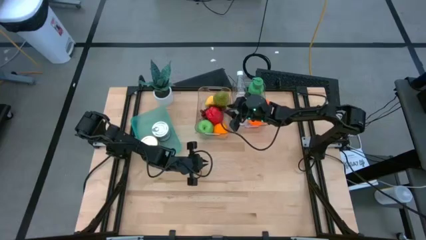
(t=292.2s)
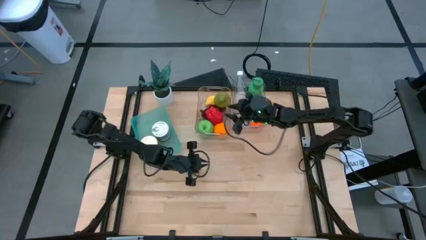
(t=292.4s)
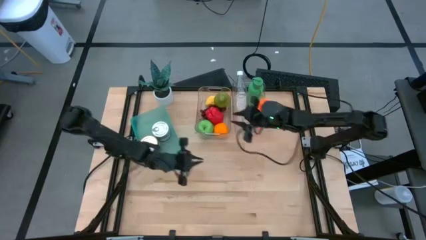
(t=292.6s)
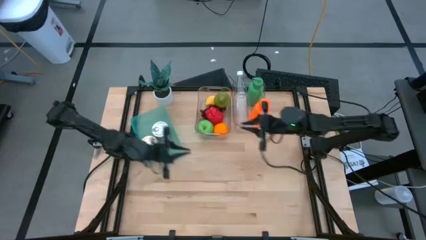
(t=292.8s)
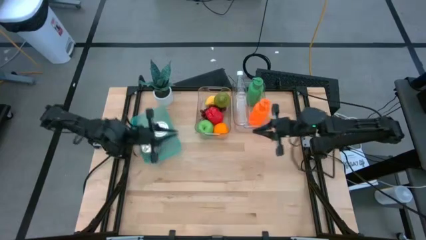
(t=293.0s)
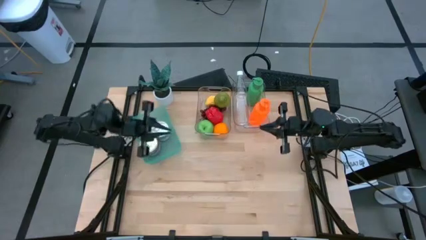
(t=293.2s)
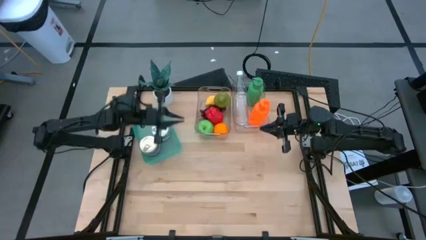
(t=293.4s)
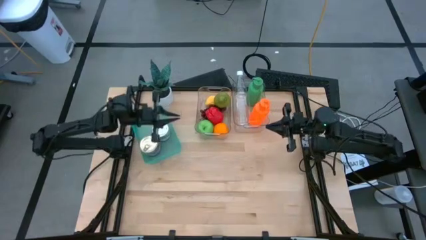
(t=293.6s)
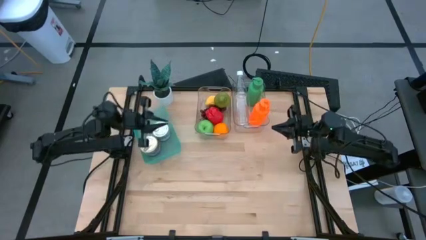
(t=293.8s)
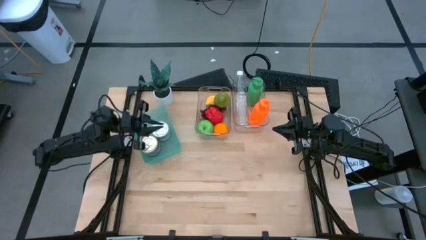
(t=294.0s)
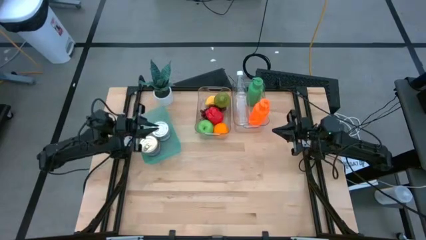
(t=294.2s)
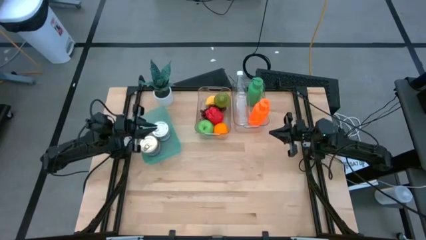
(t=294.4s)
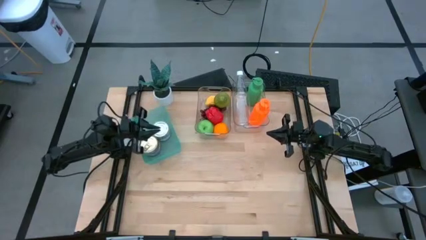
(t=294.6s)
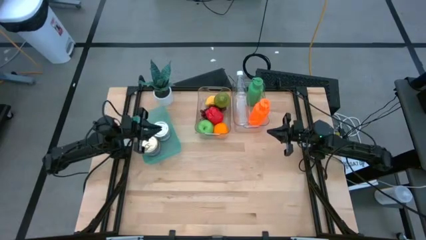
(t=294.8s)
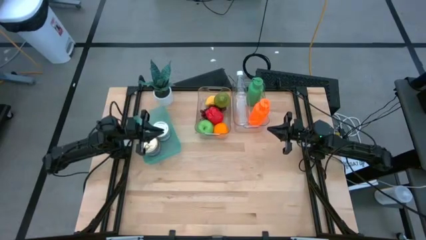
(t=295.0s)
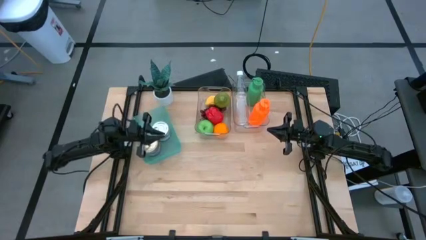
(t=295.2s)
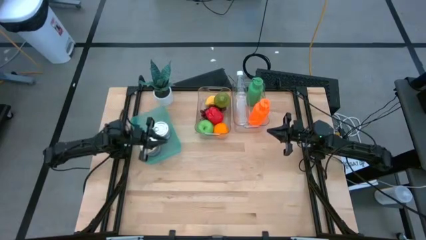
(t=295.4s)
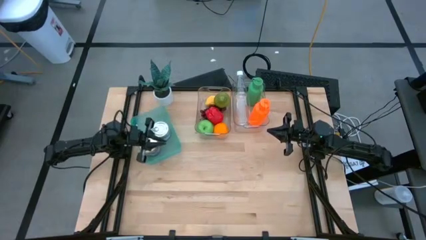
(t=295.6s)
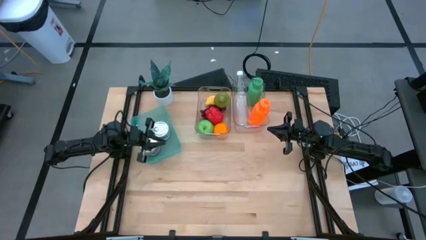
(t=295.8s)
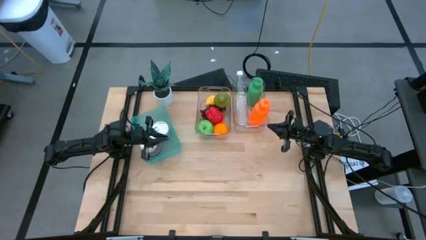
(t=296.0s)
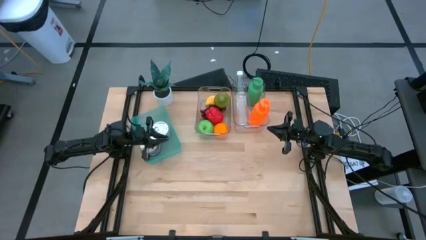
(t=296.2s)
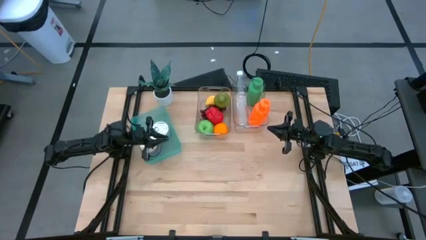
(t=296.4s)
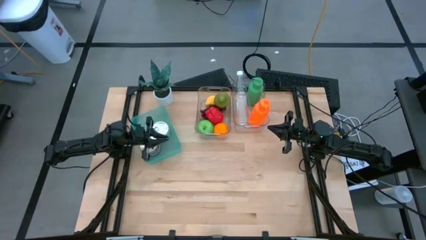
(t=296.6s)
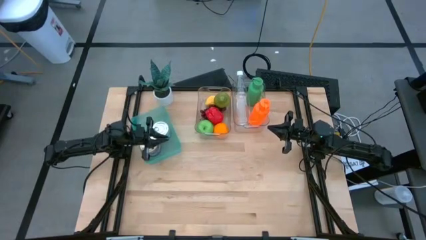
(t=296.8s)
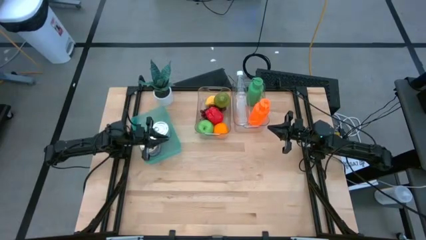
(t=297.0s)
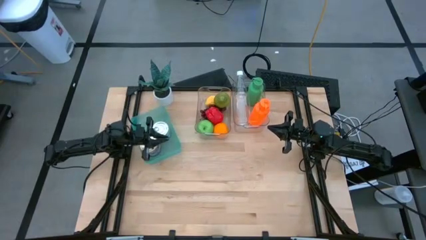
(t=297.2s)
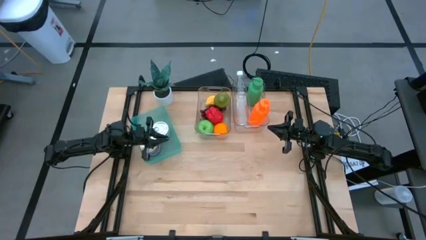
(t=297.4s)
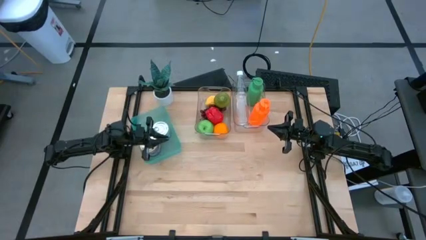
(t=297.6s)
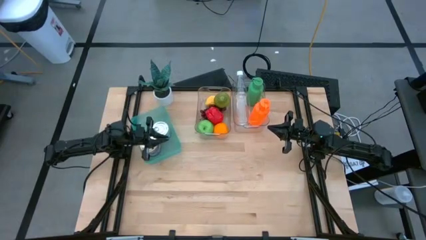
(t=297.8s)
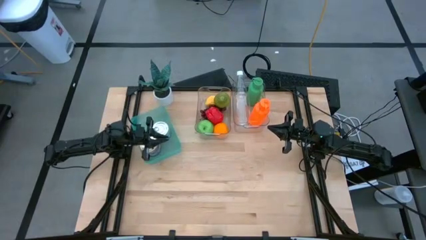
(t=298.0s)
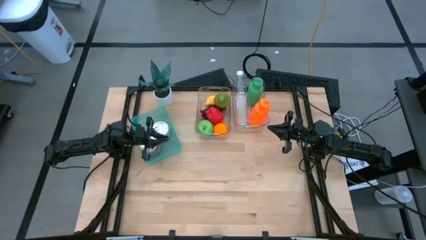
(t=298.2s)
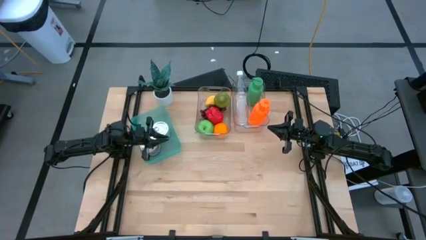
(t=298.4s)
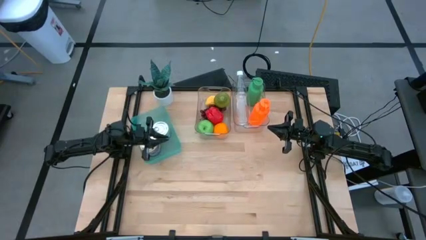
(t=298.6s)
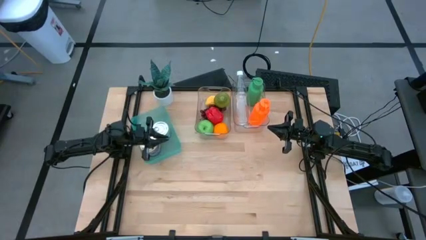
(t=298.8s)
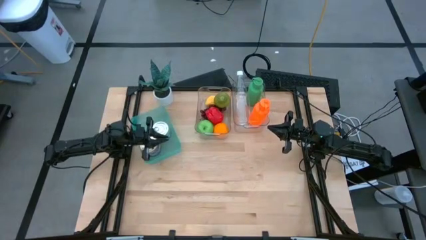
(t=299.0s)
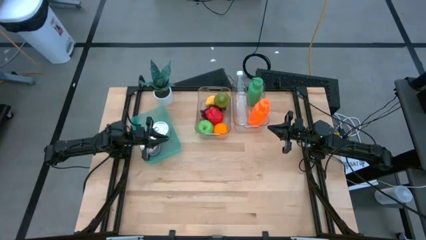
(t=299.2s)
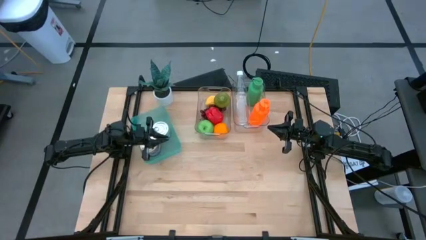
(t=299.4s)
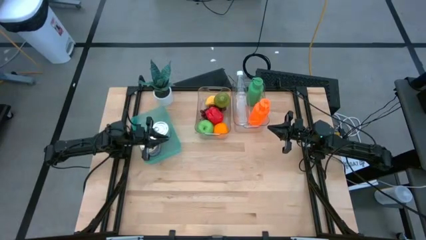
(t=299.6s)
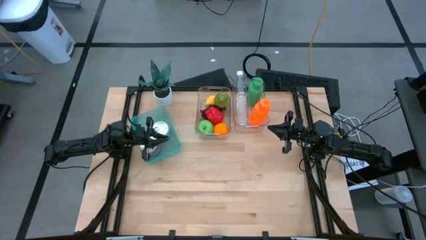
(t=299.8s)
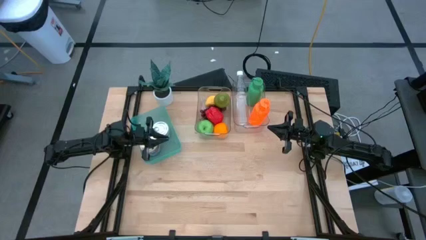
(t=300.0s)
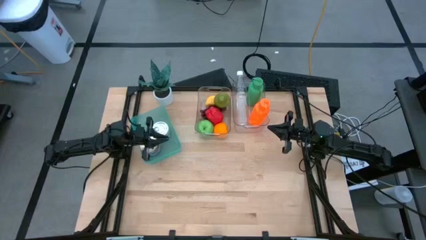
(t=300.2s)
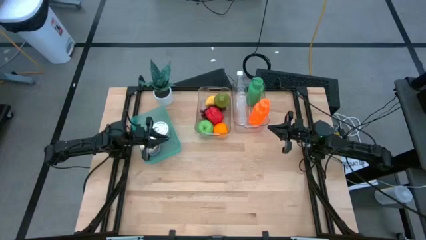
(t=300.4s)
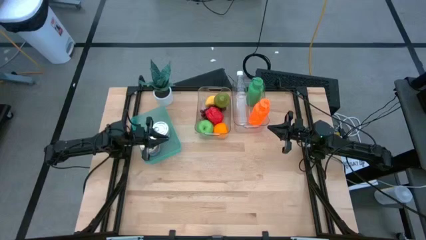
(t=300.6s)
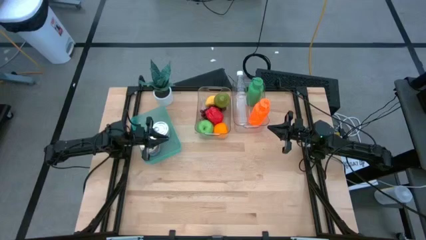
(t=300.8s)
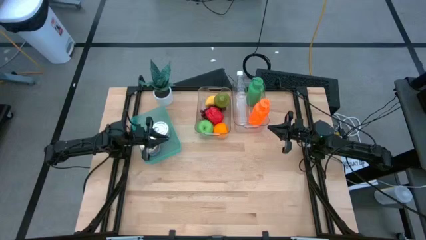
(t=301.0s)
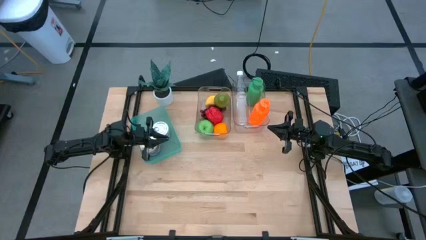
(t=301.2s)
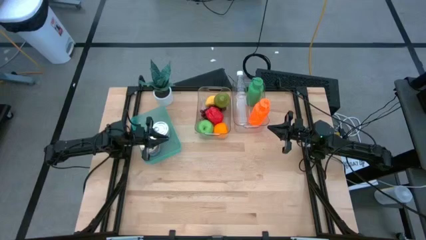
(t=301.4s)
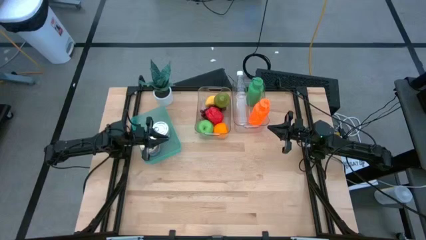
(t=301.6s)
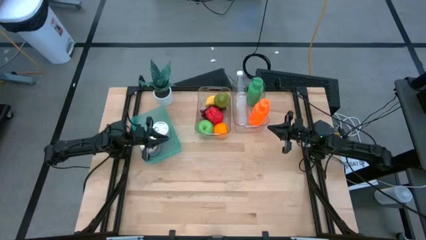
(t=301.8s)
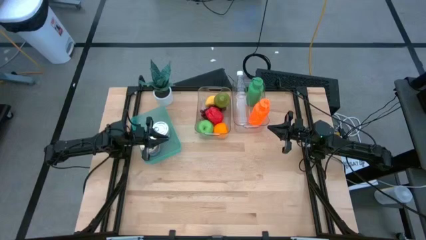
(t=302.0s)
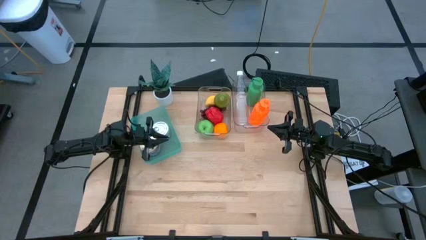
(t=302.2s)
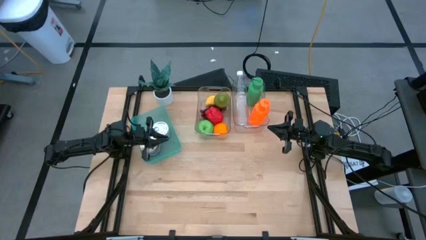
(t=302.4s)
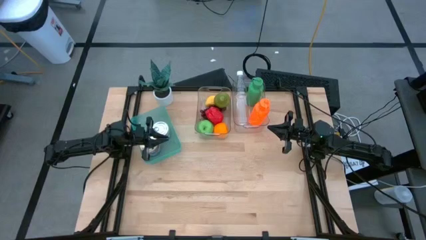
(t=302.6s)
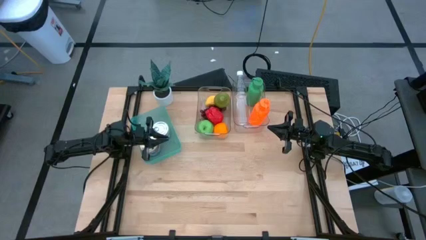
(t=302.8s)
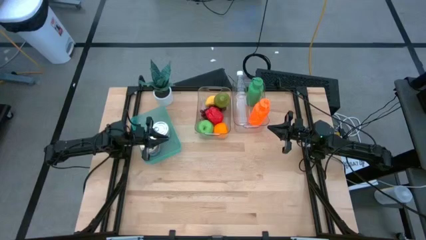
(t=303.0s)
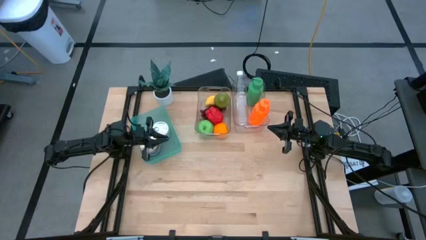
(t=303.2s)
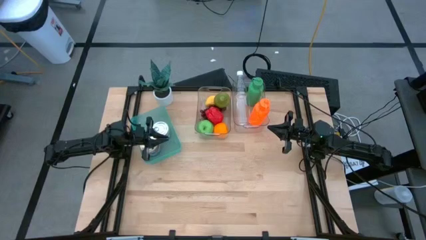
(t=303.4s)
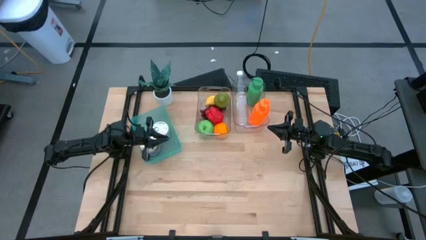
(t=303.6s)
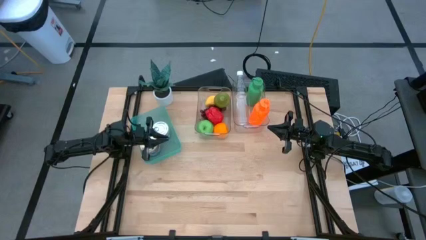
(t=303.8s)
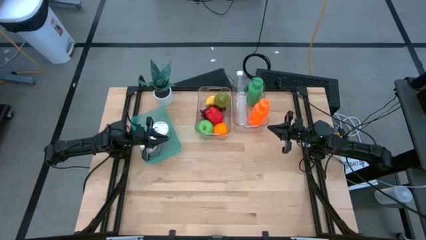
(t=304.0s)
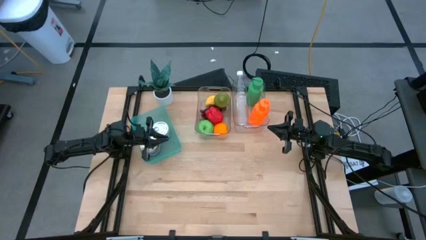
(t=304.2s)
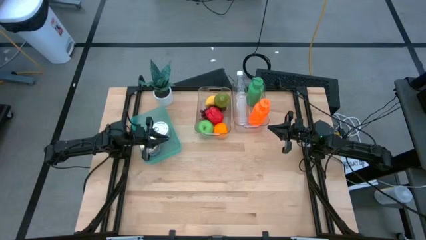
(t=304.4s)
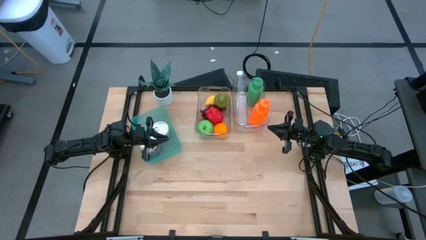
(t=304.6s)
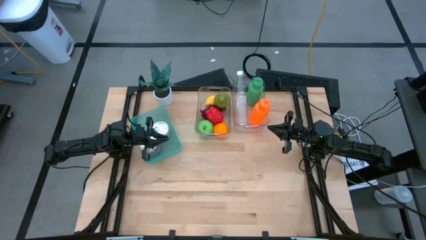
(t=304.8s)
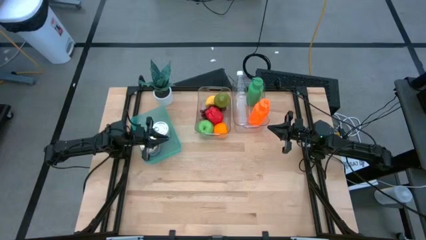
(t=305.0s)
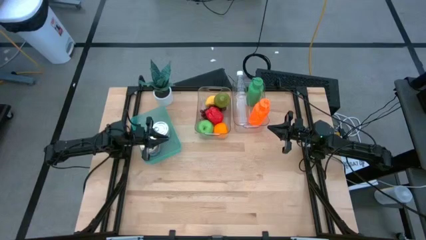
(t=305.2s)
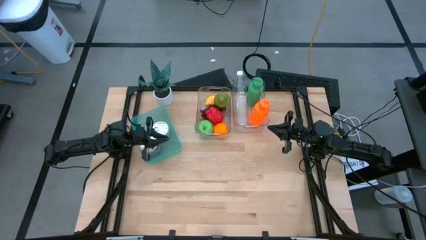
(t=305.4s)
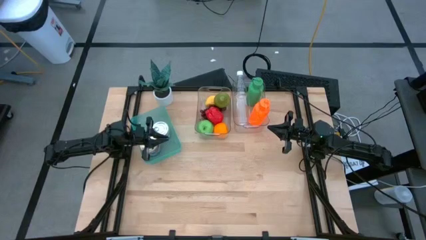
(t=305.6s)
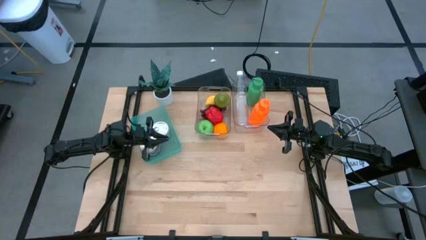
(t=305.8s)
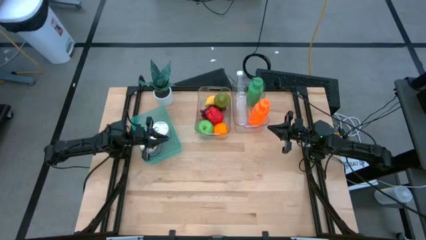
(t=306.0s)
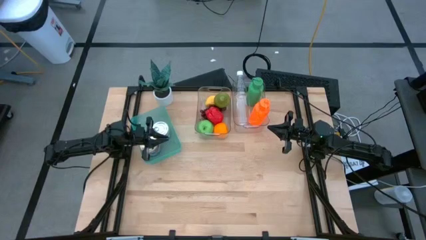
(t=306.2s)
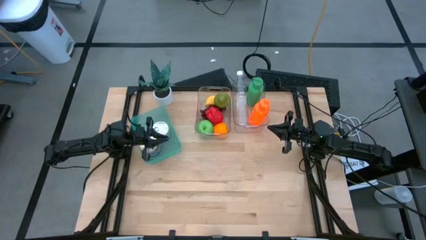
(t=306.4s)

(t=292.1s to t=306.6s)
Task: Pick & Place Food Item
Return to Home Position
